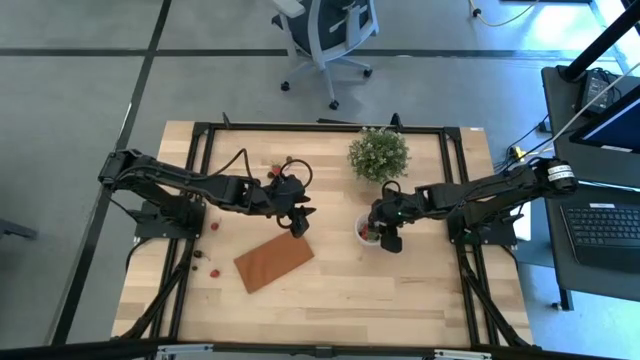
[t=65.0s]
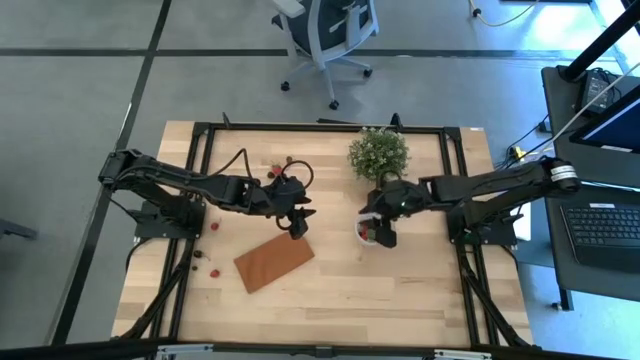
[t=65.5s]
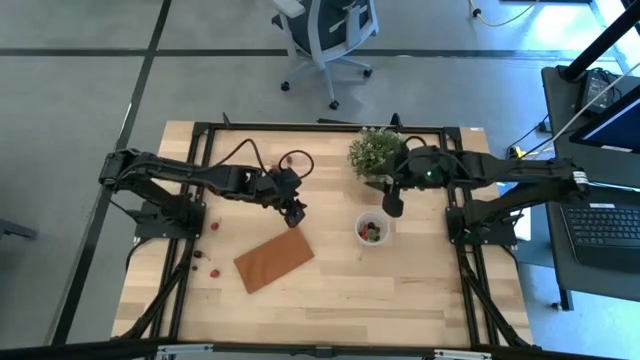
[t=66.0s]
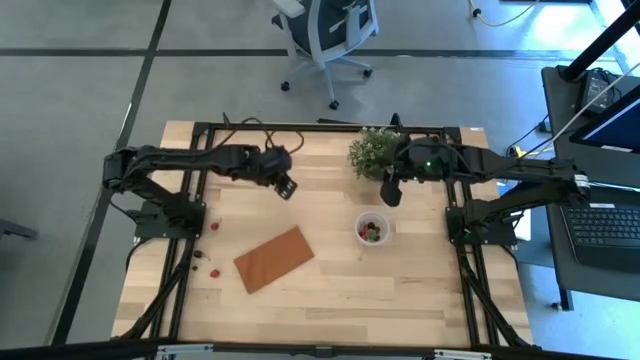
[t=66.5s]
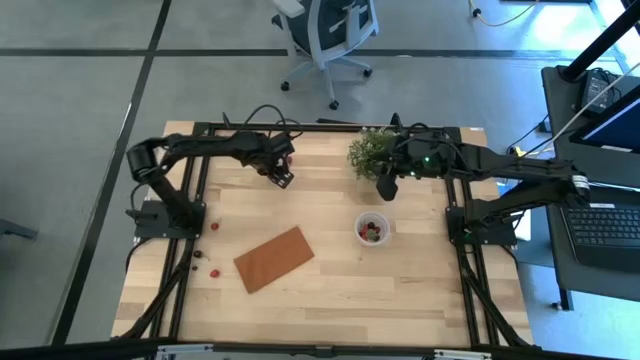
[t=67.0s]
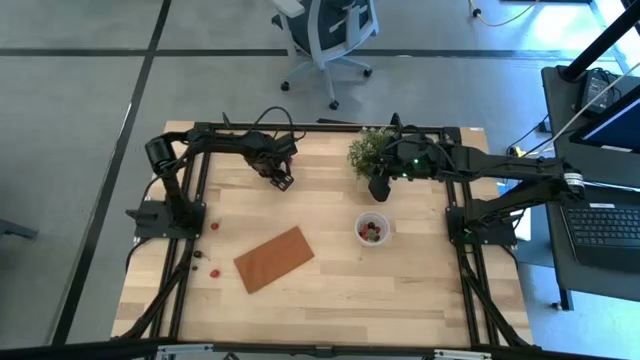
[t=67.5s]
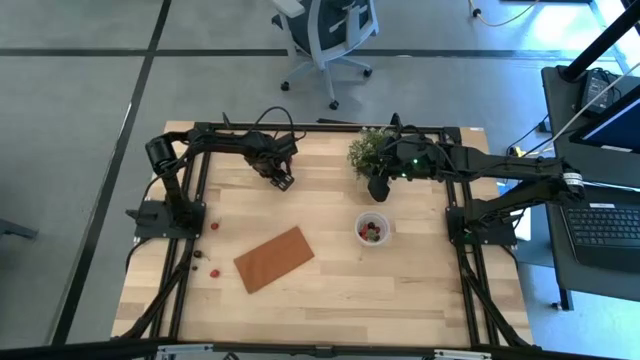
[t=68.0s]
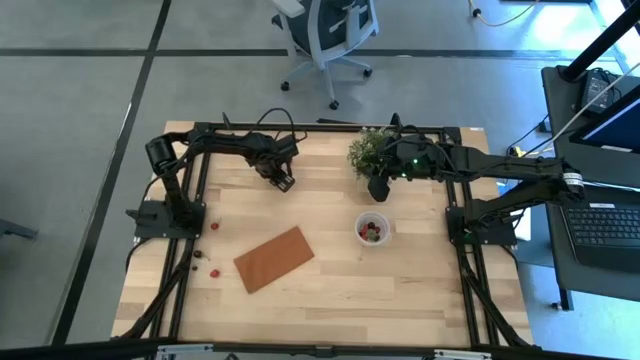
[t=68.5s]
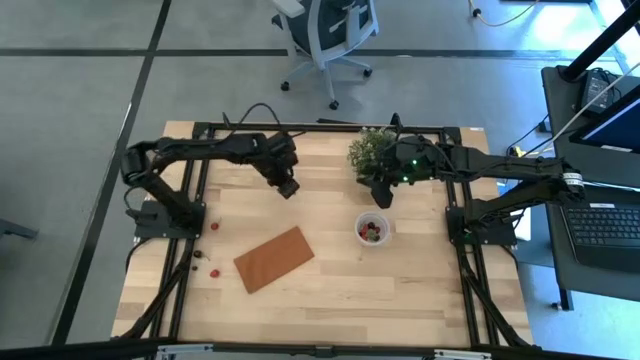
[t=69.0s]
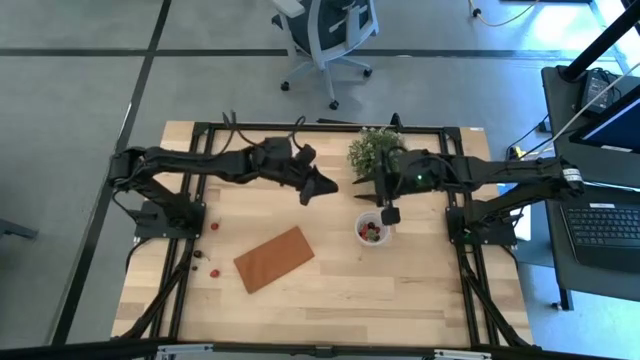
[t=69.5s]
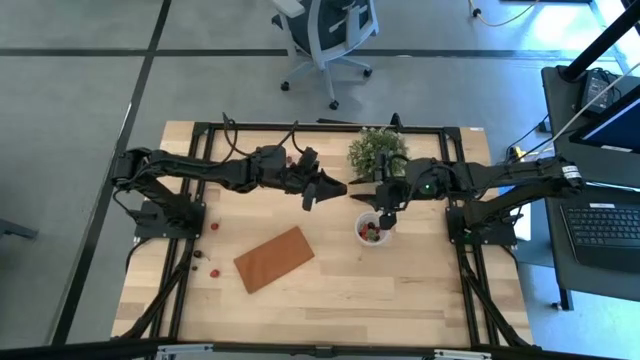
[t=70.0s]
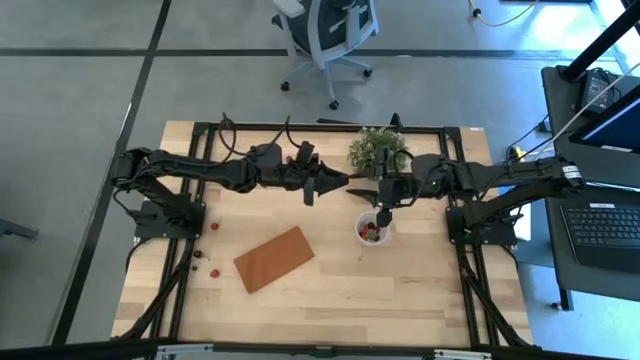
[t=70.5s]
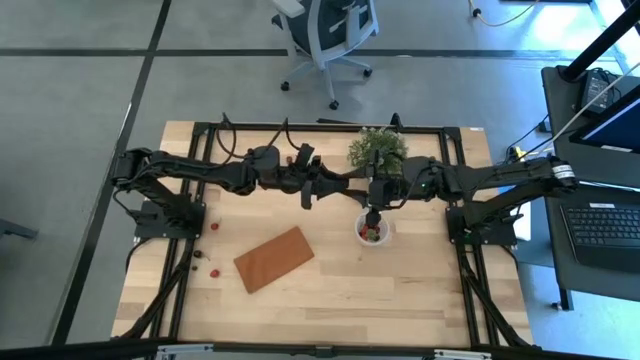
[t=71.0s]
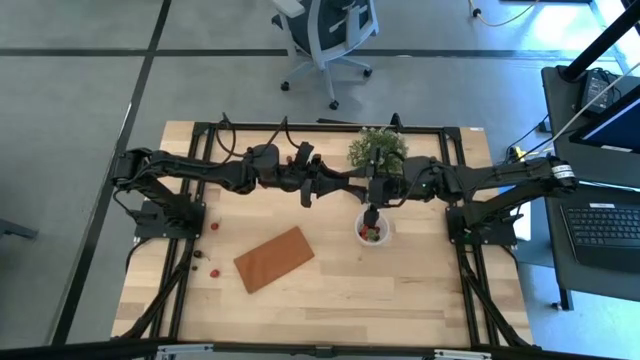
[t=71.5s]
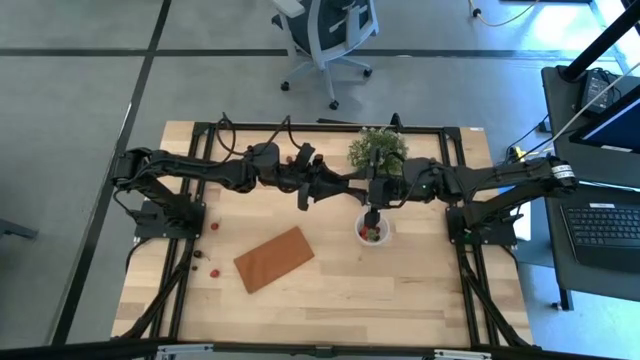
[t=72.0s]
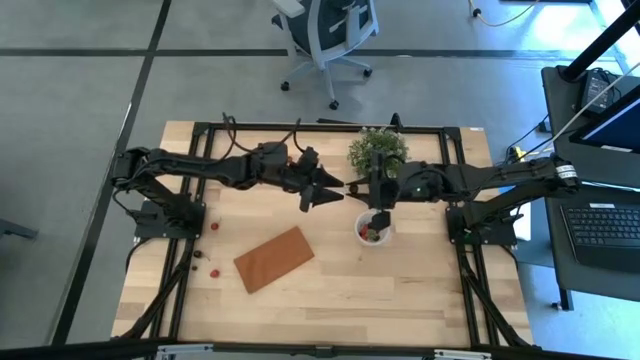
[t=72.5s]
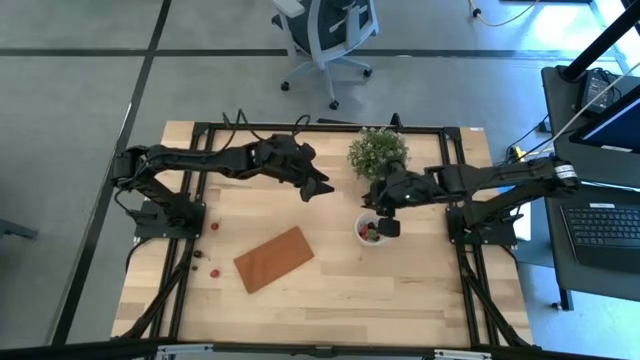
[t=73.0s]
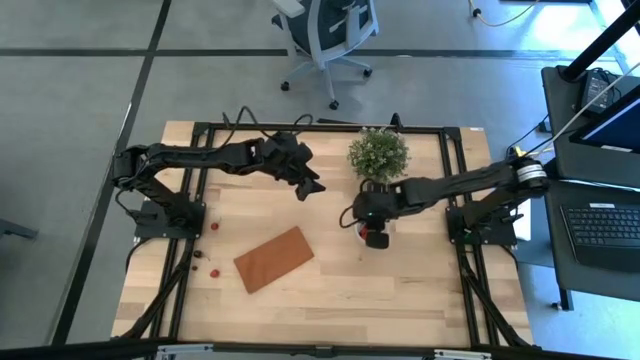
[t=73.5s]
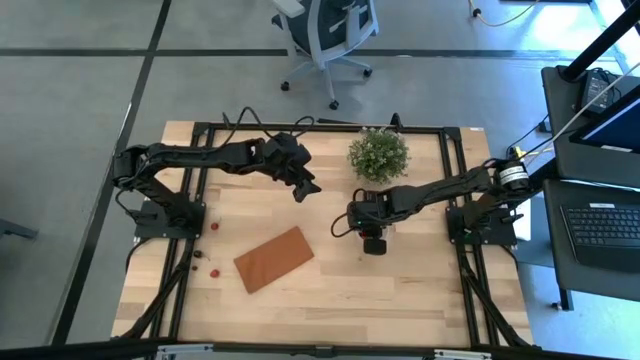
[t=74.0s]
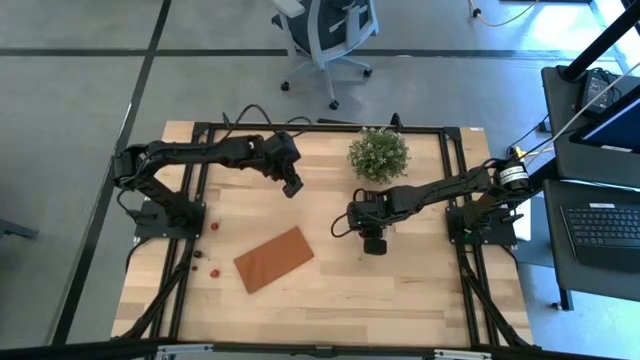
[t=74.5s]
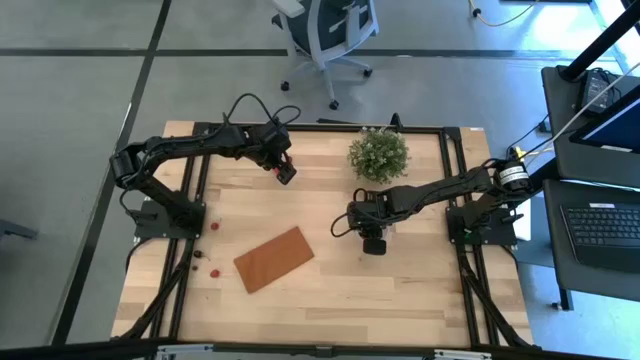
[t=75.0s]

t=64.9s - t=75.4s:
Task: Pick and placing Produce into tupperware
Put the blackberry into the transparent container

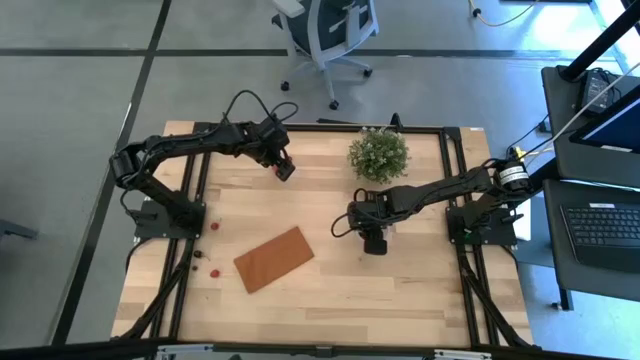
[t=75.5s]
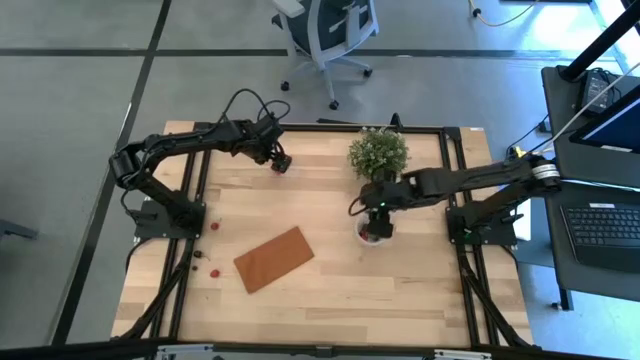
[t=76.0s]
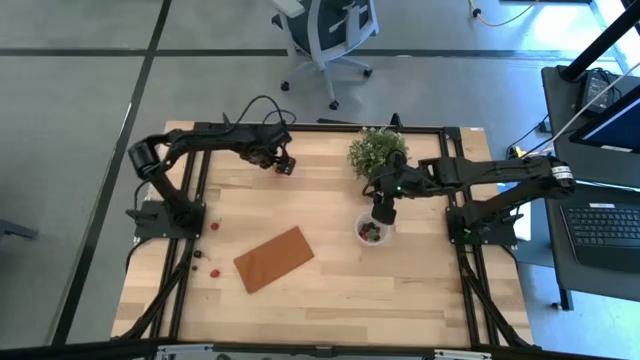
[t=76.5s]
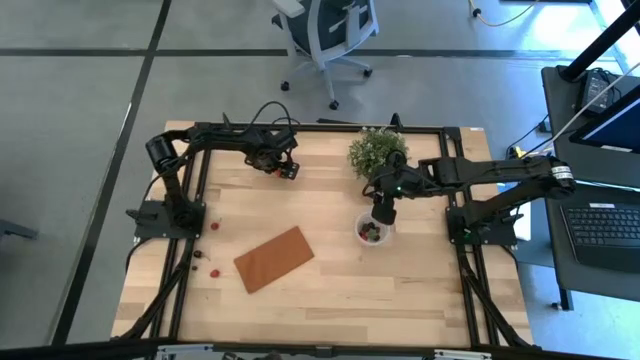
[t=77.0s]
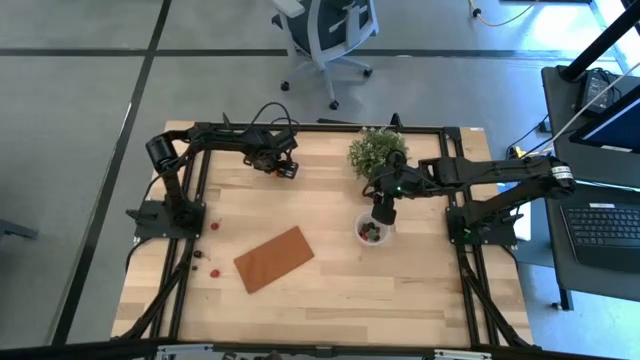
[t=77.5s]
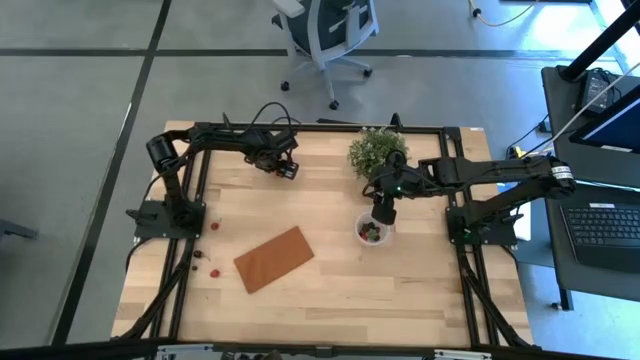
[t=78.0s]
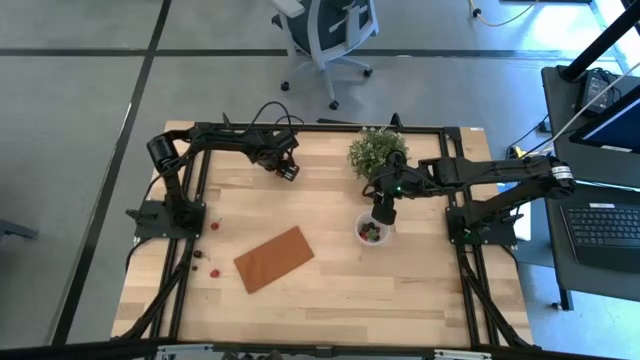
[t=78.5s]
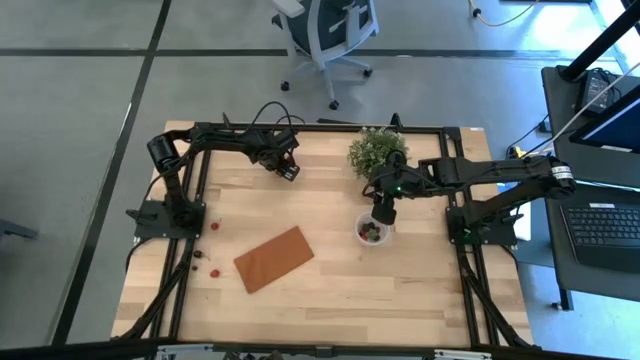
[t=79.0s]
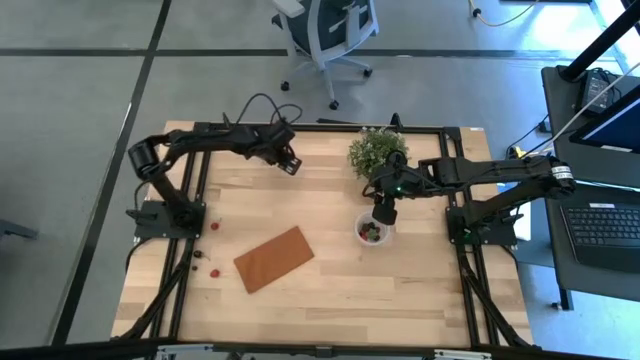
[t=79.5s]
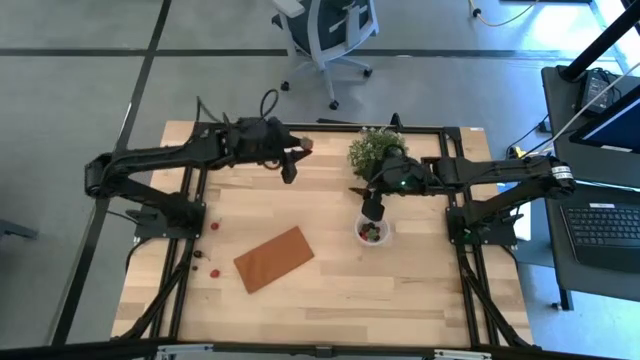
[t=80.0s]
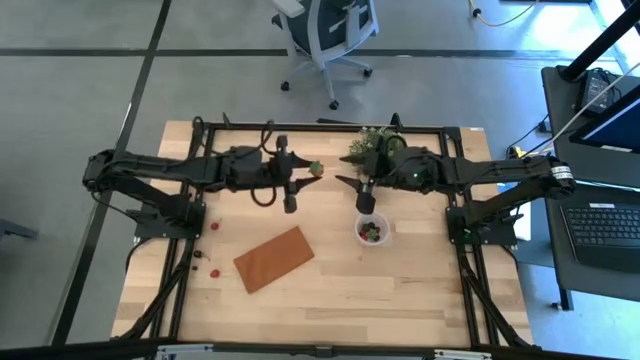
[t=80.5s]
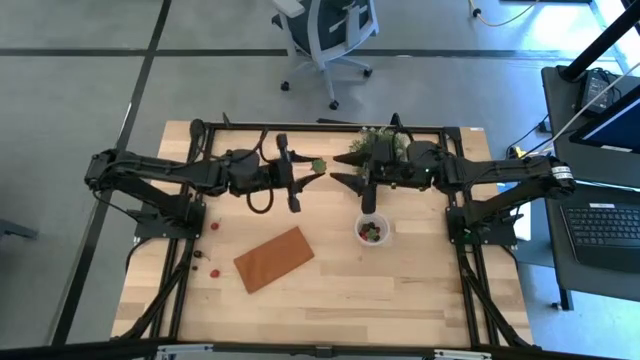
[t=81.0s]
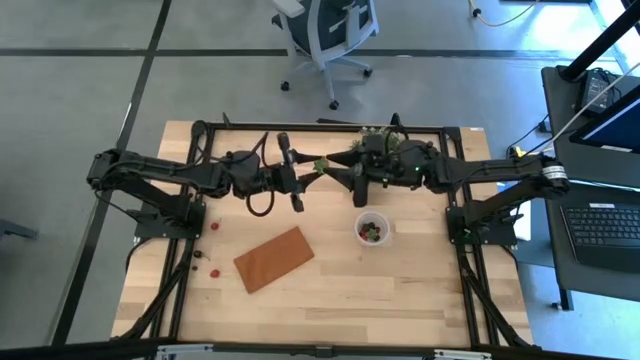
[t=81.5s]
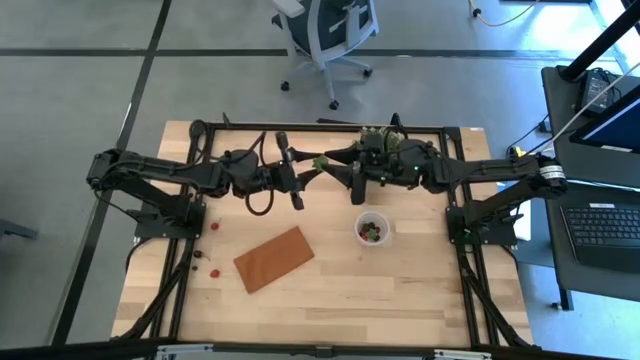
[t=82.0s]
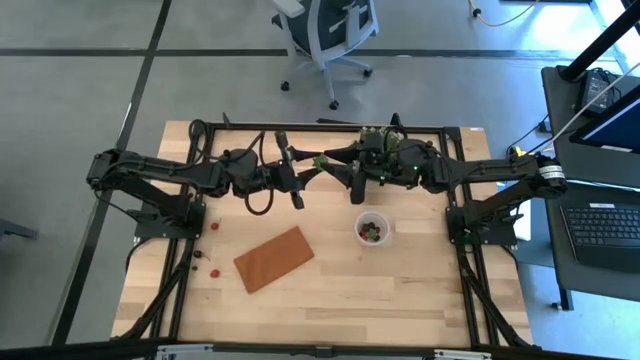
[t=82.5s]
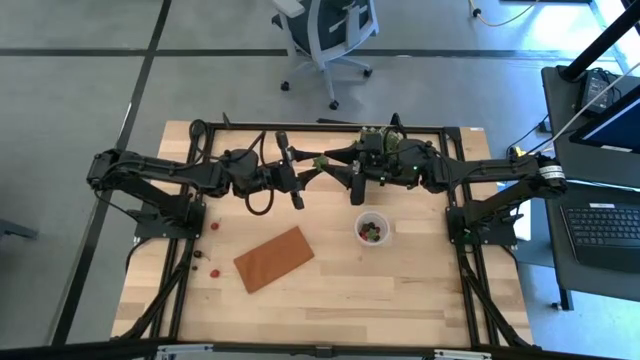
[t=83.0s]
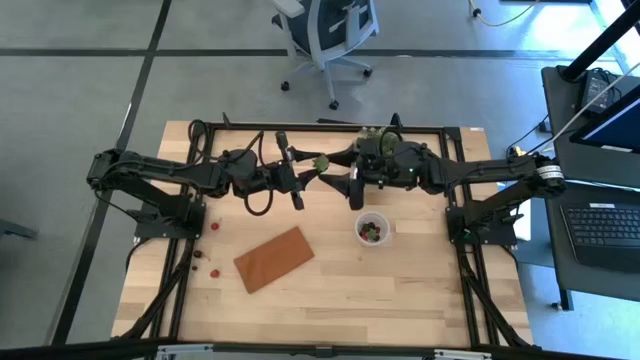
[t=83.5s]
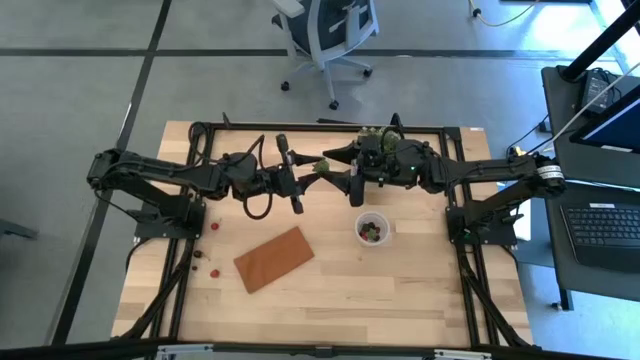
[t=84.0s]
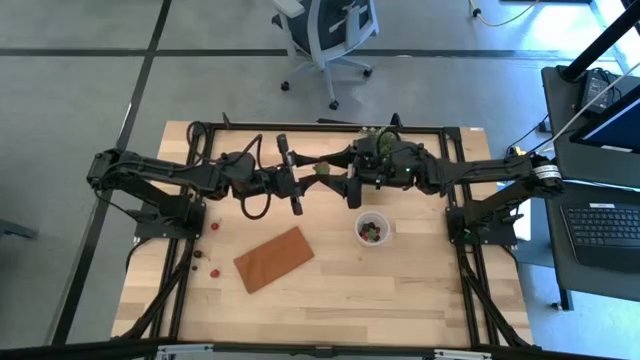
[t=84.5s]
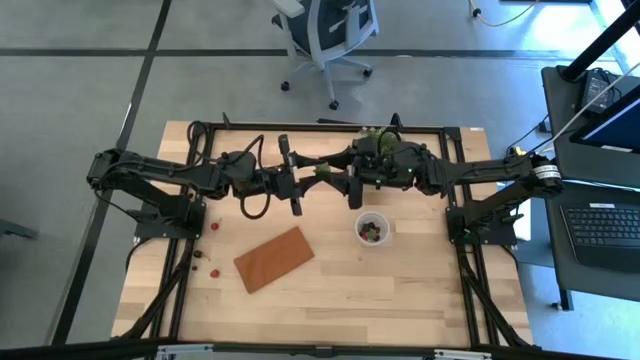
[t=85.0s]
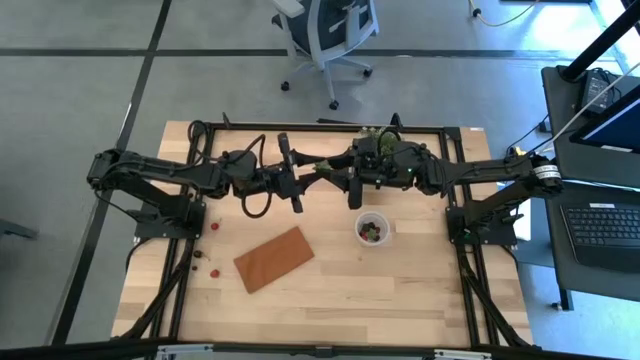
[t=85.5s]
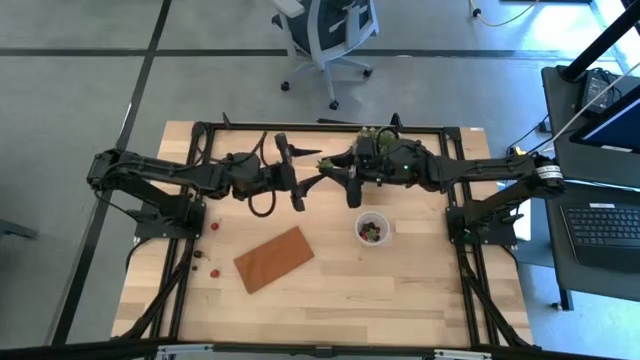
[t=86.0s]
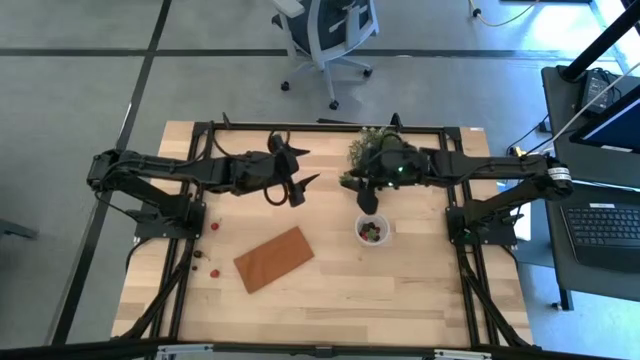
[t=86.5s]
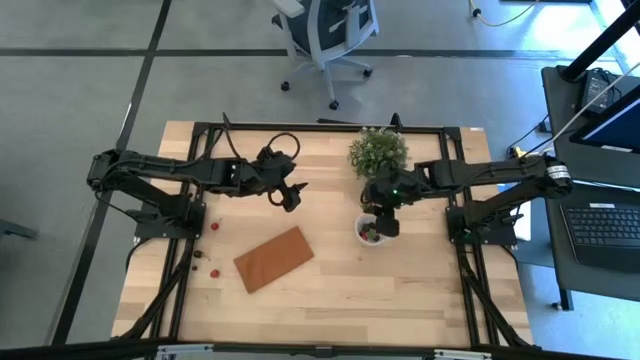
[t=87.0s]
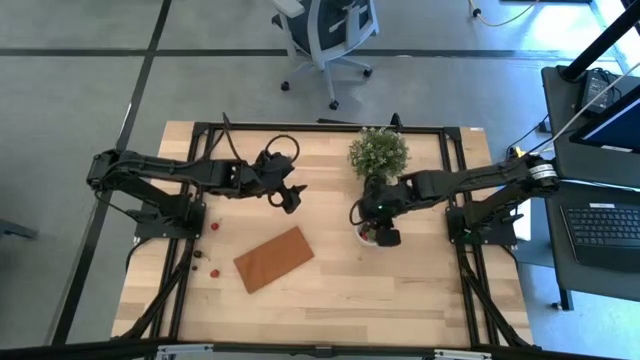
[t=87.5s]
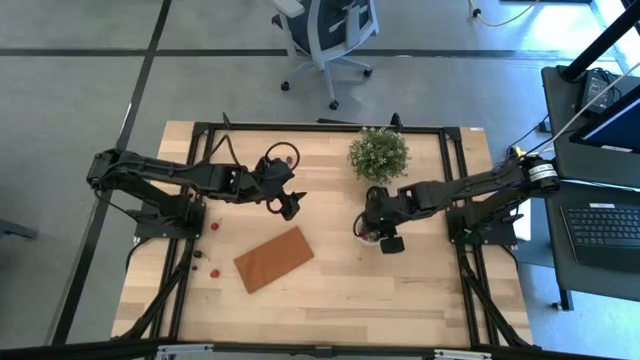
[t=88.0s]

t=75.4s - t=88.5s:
Put the red strawberry into the transparent container
